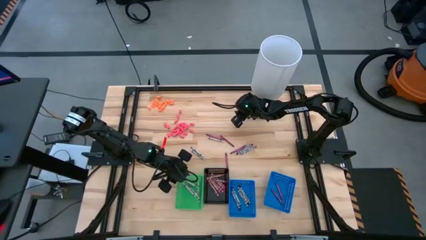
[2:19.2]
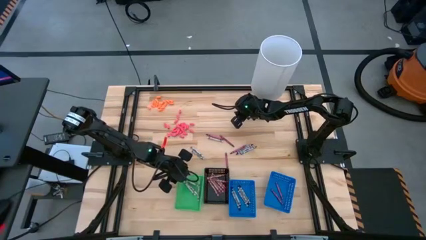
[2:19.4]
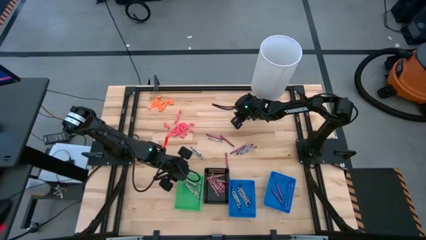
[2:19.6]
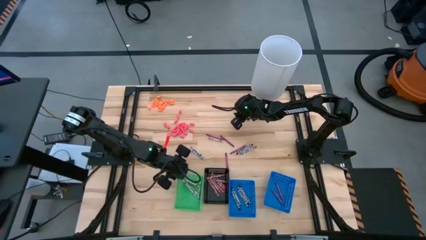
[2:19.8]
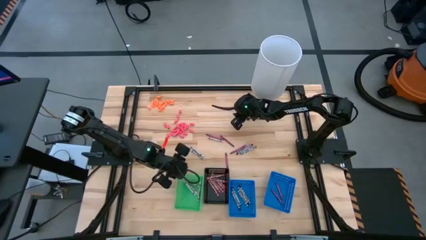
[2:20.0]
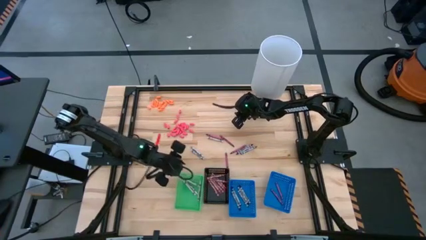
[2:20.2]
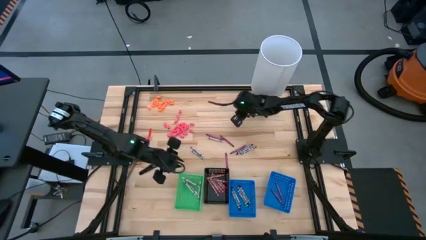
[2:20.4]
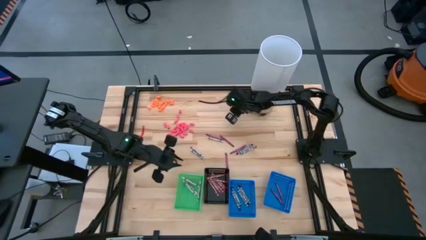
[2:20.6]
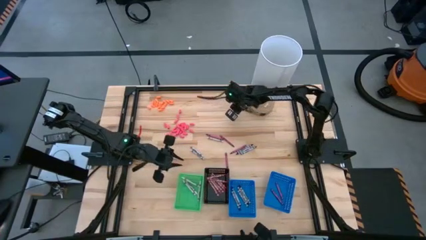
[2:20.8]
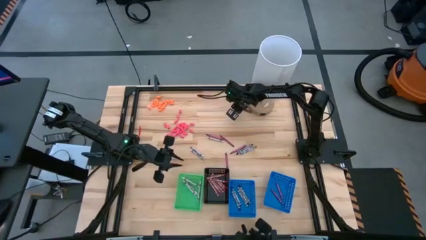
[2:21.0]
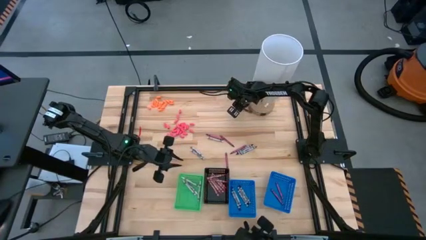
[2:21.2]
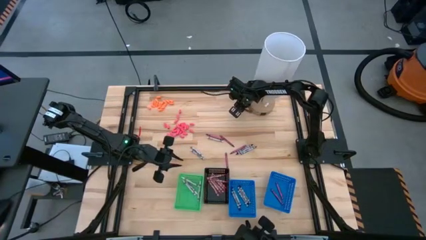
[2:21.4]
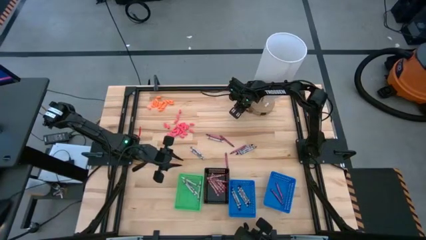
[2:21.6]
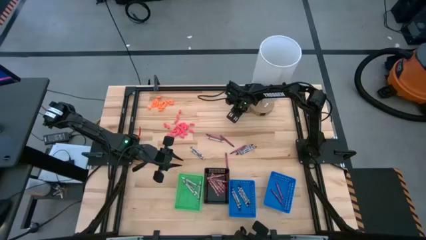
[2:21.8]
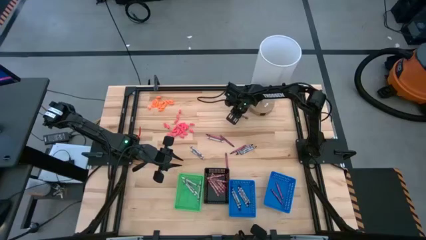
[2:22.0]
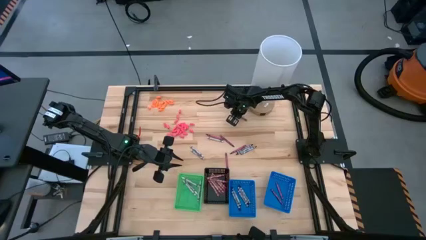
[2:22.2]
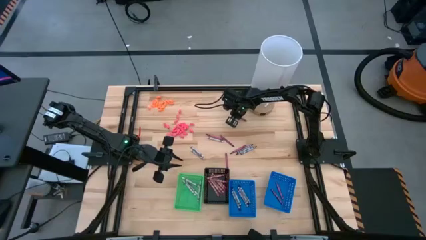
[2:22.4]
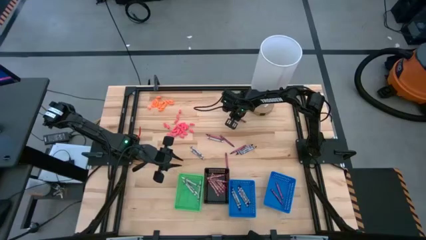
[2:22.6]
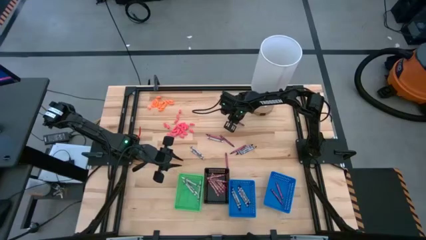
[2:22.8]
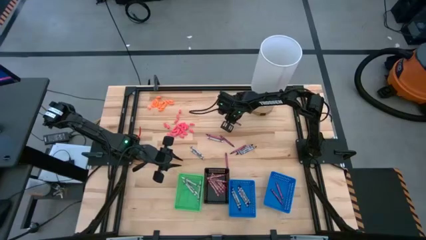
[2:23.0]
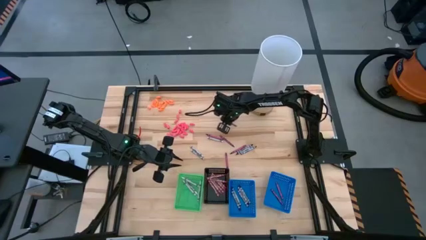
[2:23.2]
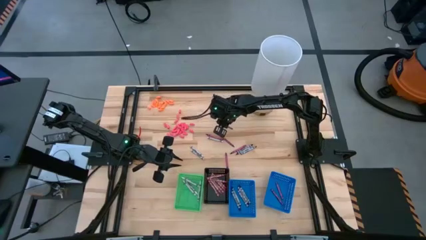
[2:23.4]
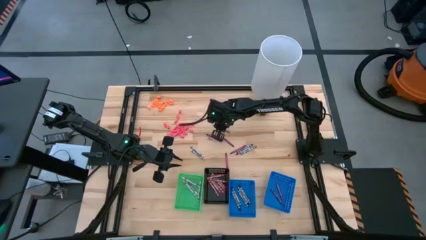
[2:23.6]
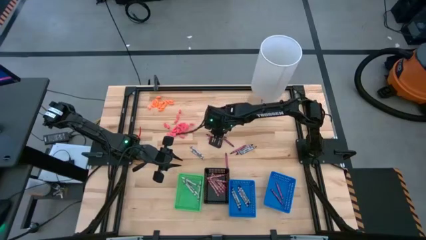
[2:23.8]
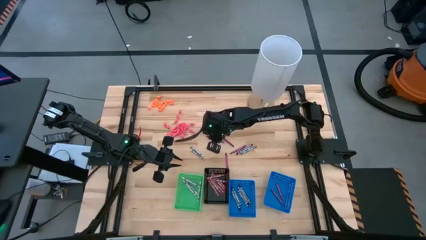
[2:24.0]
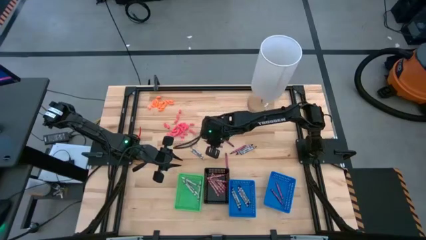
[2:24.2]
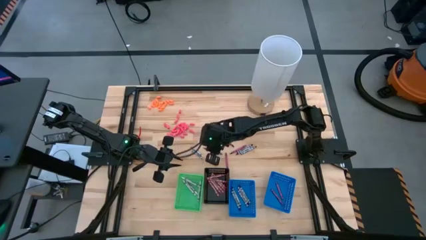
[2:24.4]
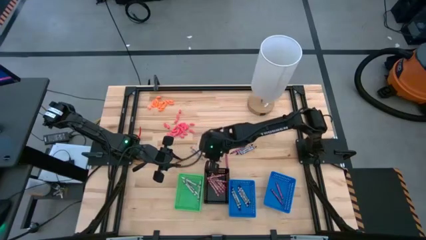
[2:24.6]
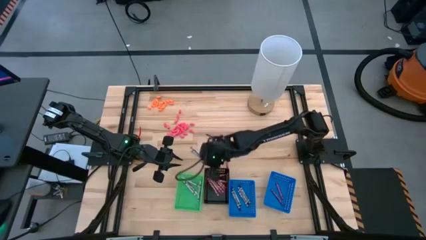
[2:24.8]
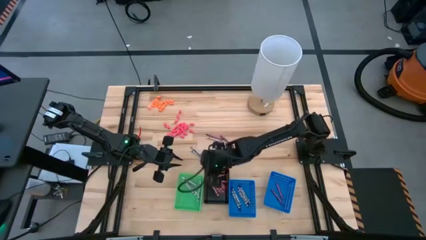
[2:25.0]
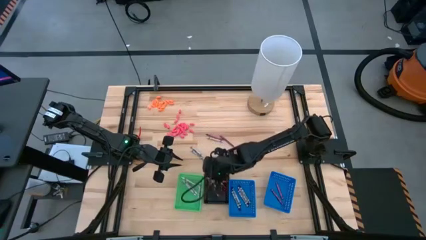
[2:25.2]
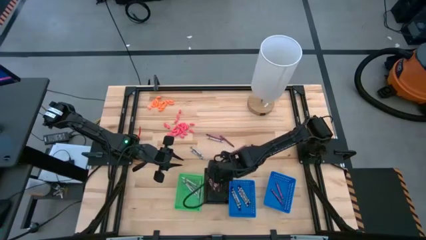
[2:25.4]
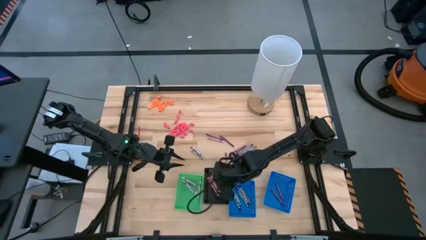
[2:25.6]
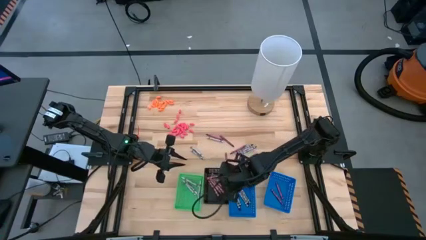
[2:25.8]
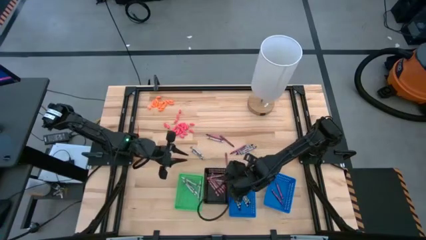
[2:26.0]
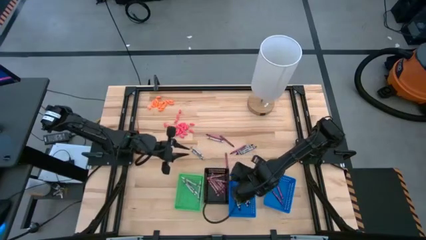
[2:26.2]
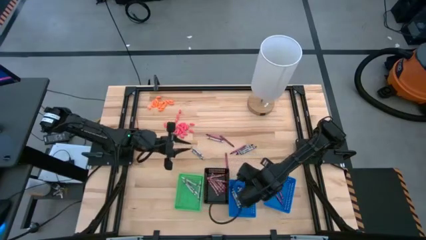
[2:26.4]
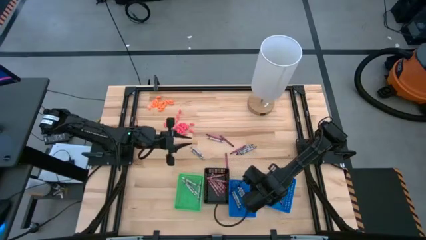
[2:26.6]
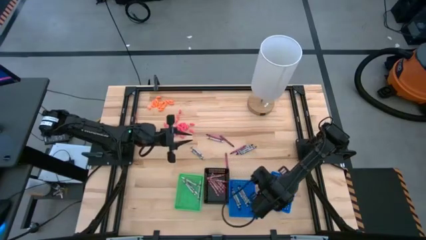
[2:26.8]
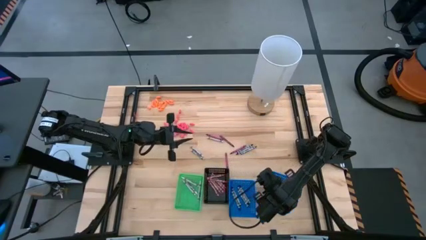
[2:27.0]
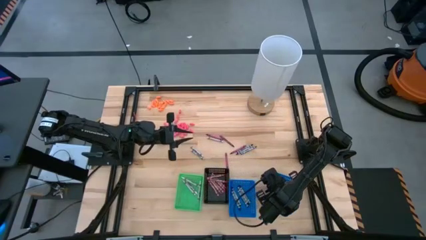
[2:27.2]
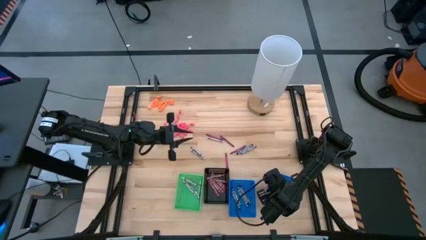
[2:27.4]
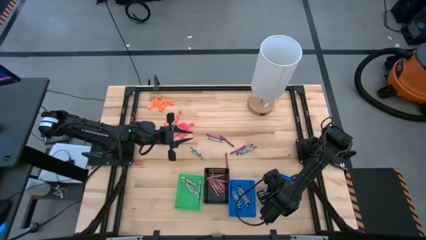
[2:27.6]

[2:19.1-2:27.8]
Task: Sort crayons
Put the red crayon into the right blue bin

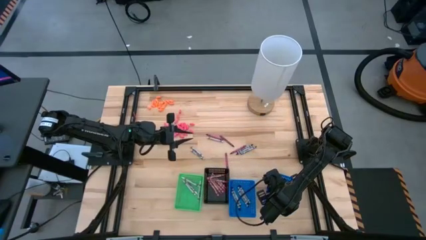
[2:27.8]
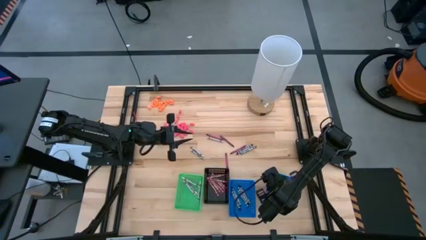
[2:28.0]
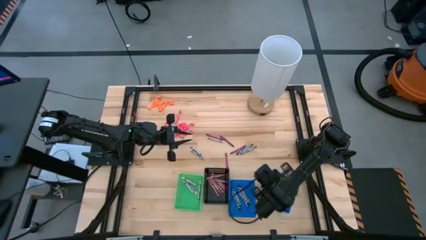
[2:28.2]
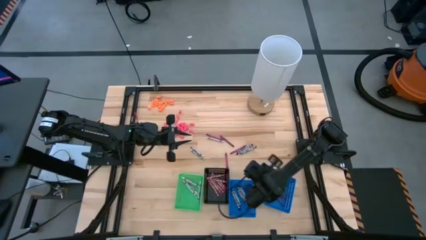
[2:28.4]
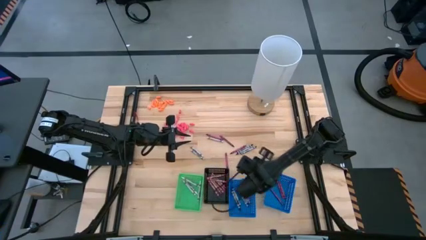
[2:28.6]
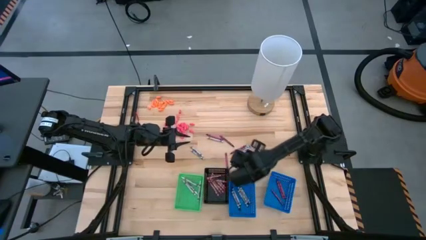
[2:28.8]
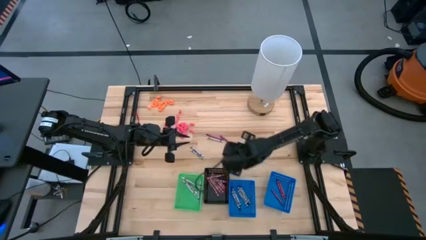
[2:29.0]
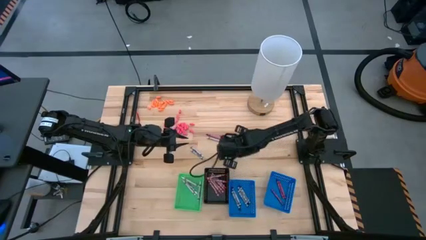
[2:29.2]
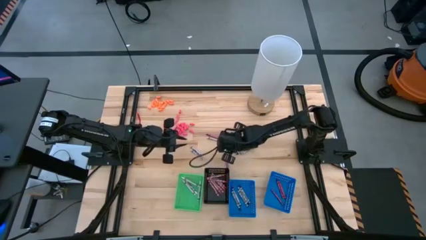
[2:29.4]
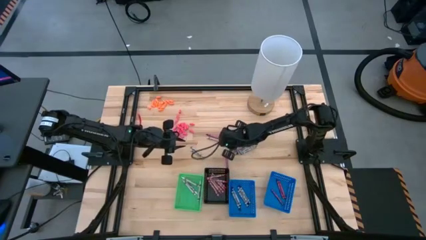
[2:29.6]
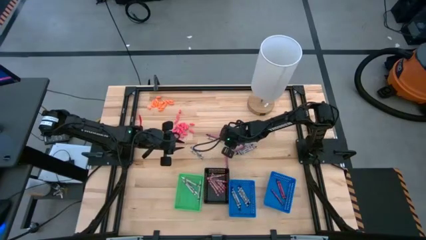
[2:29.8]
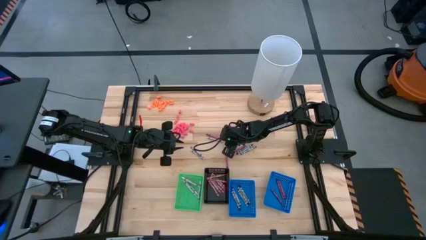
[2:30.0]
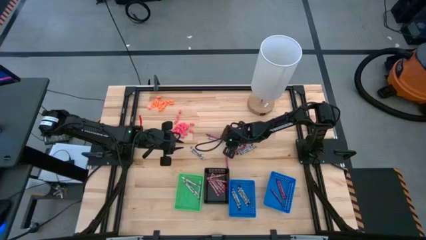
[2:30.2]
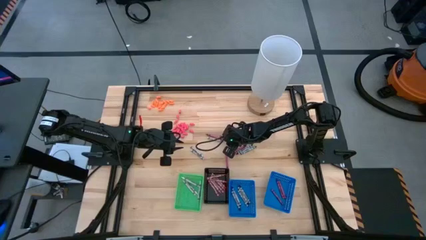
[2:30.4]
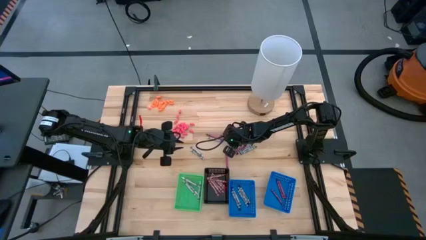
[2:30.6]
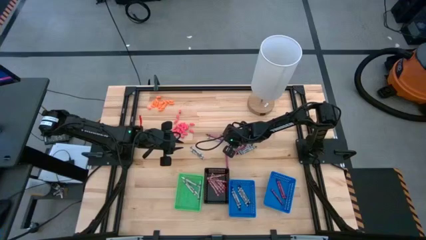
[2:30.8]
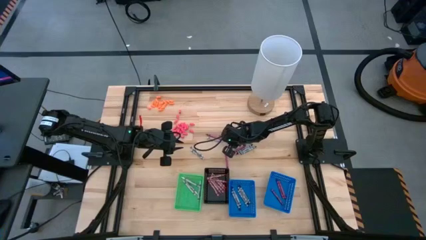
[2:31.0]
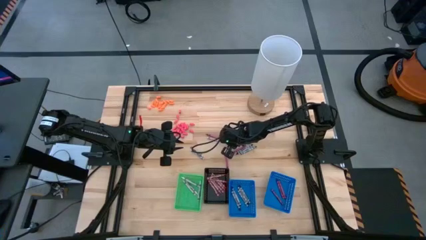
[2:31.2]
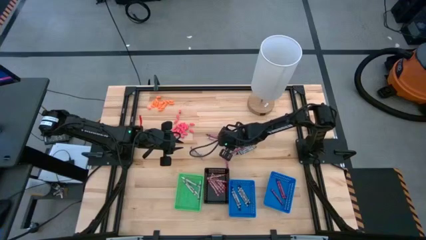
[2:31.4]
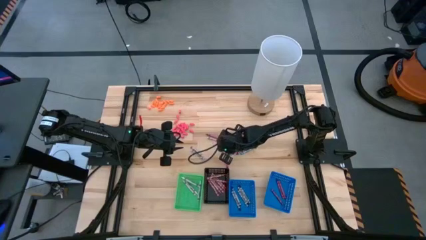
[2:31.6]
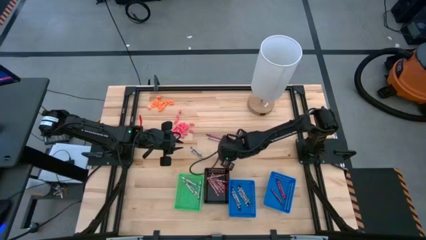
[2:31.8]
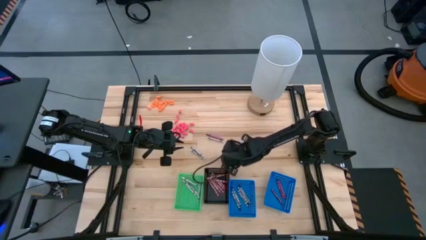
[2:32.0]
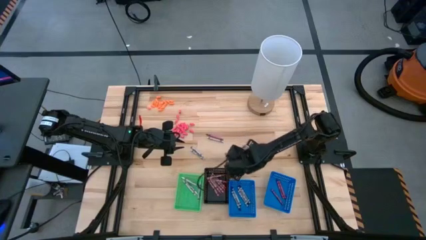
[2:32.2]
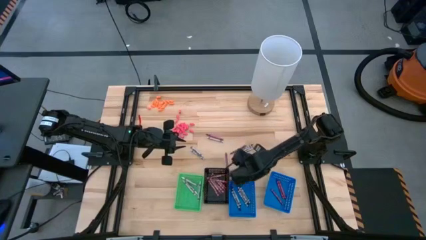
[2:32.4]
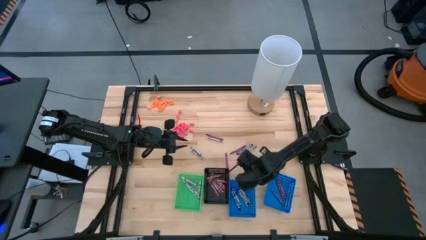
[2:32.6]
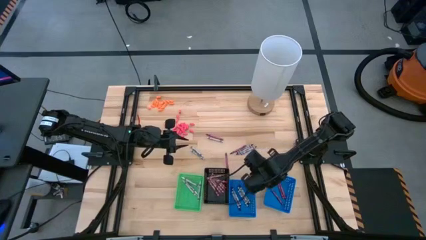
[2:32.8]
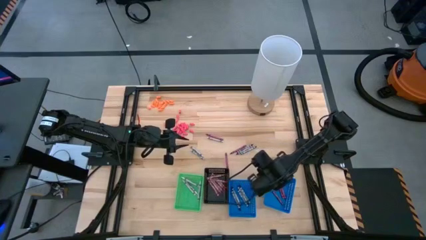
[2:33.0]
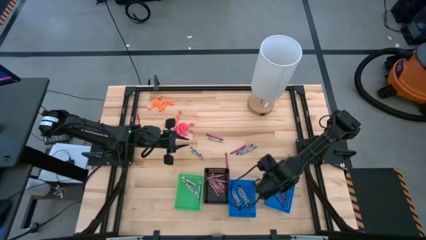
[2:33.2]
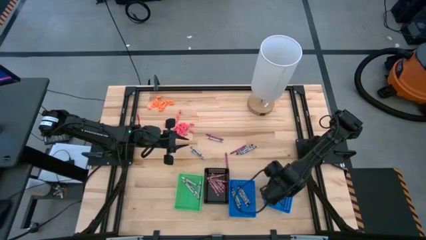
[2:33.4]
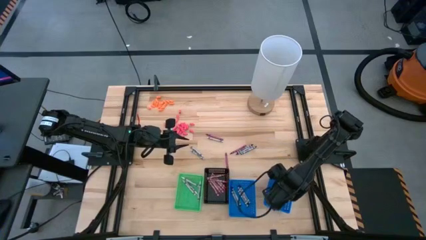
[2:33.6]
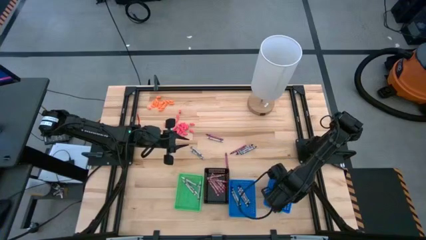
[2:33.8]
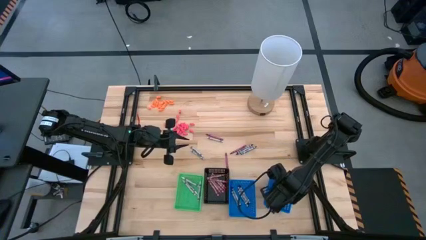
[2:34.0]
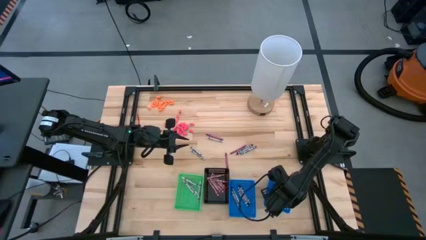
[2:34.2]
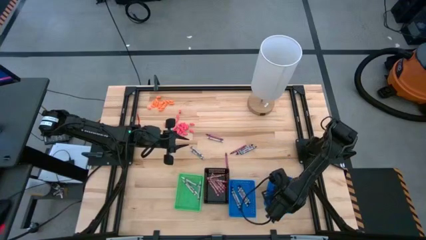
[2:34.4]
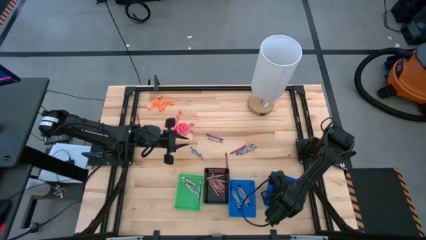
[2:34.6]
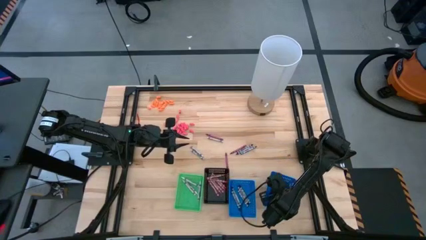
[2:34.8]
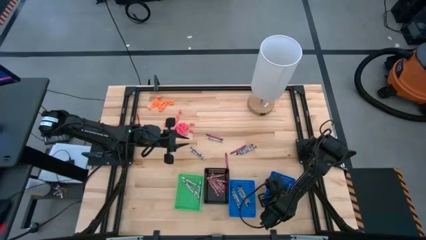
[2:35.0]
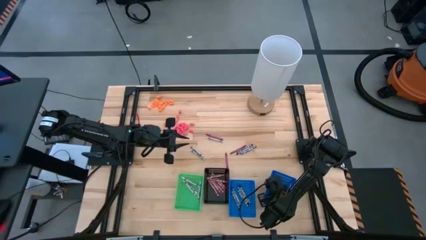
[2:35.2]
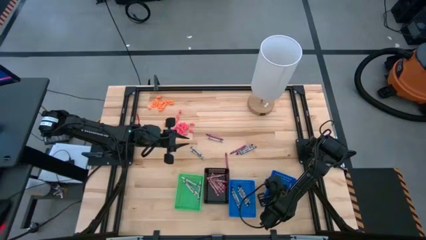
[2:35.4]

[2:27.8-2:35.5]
Put the red crayon into the right blue bin
